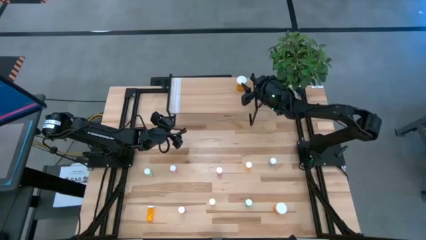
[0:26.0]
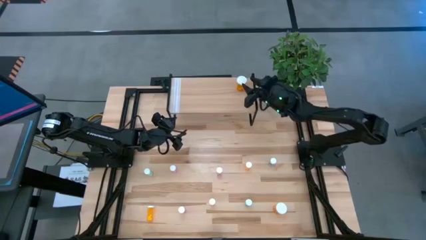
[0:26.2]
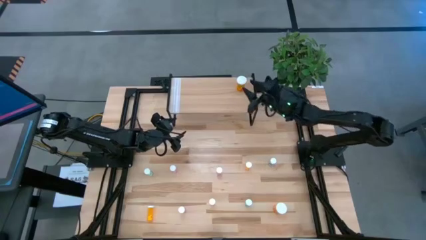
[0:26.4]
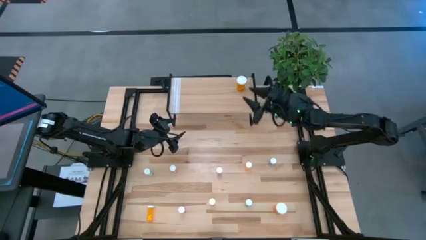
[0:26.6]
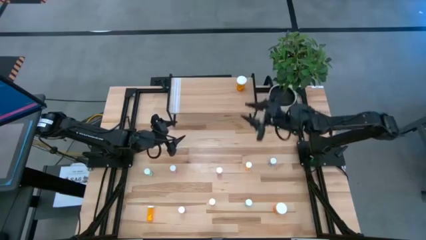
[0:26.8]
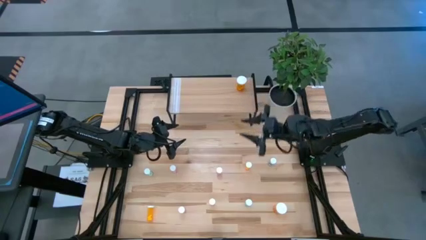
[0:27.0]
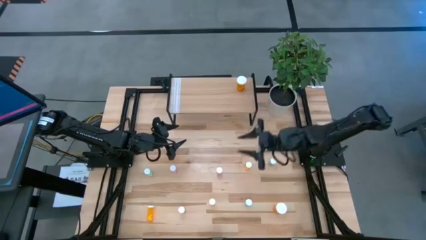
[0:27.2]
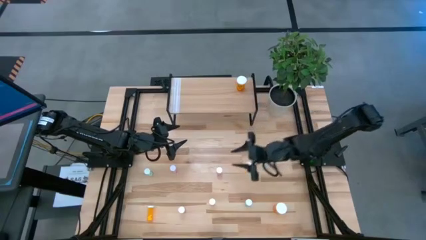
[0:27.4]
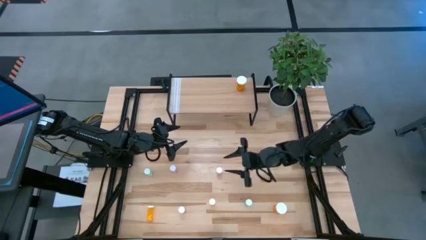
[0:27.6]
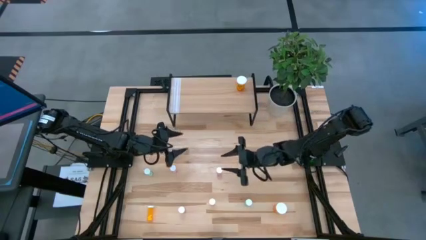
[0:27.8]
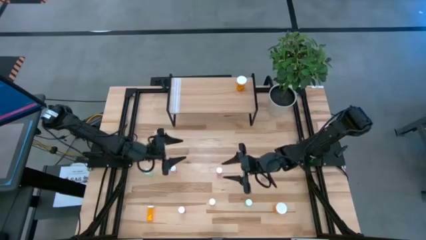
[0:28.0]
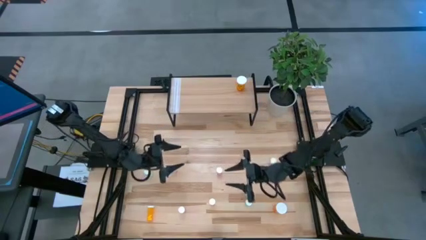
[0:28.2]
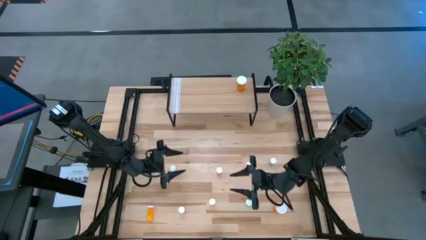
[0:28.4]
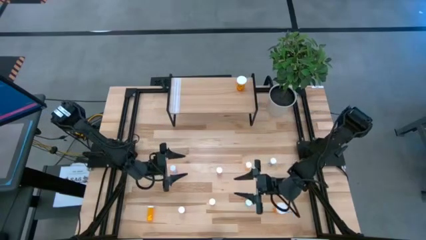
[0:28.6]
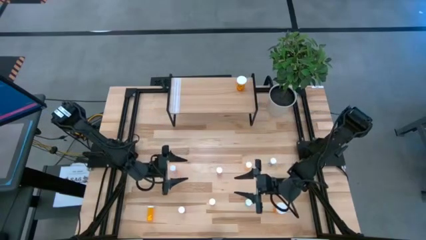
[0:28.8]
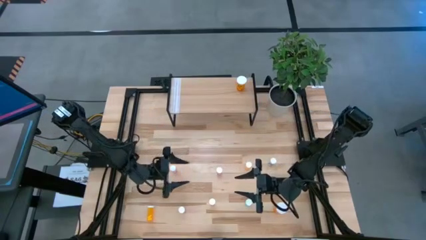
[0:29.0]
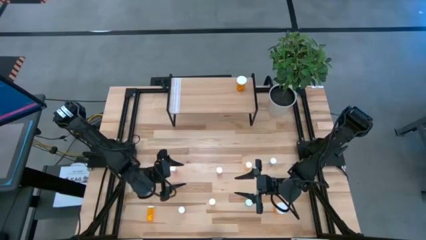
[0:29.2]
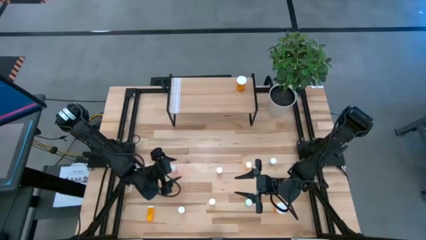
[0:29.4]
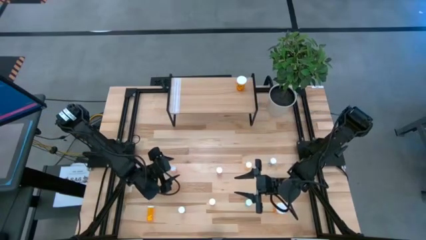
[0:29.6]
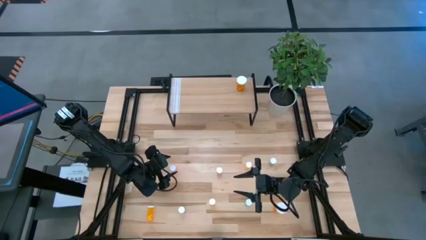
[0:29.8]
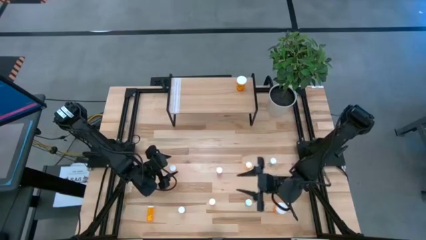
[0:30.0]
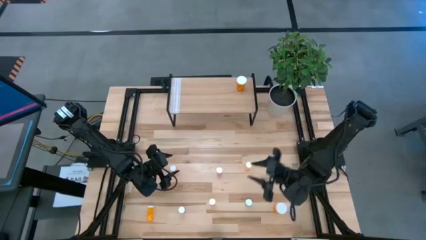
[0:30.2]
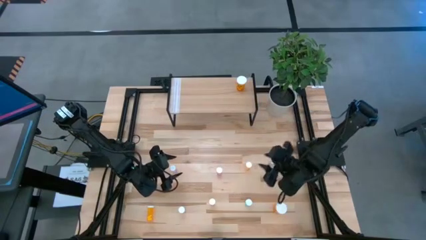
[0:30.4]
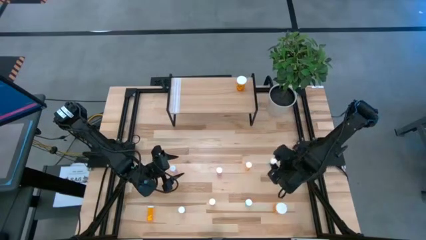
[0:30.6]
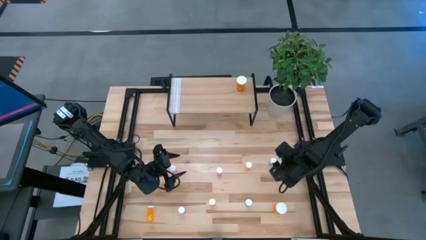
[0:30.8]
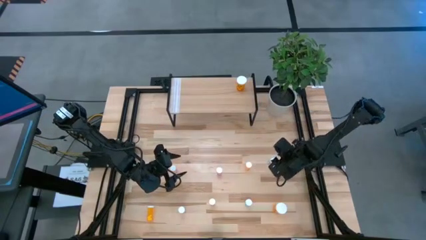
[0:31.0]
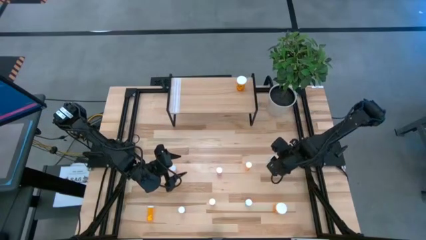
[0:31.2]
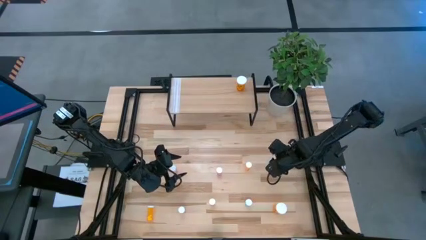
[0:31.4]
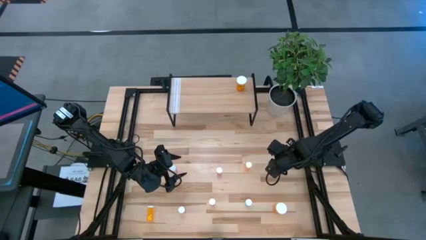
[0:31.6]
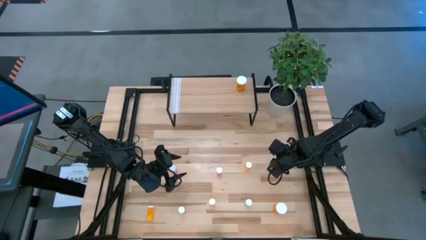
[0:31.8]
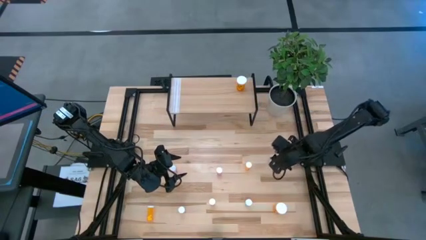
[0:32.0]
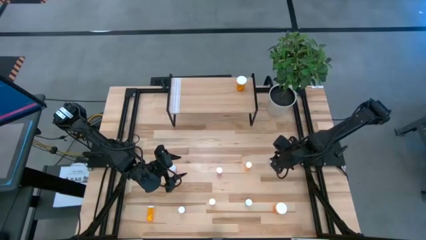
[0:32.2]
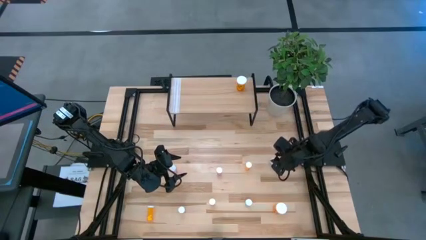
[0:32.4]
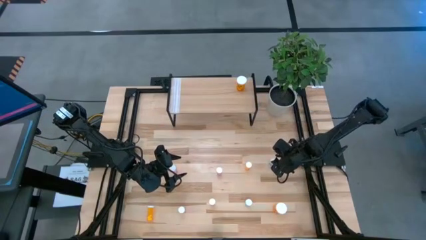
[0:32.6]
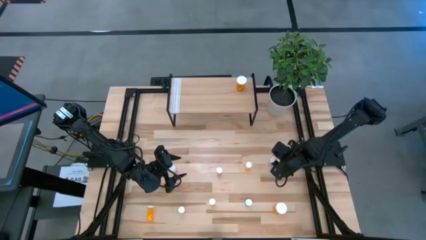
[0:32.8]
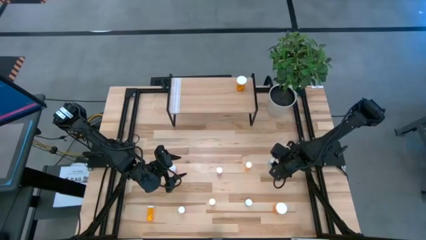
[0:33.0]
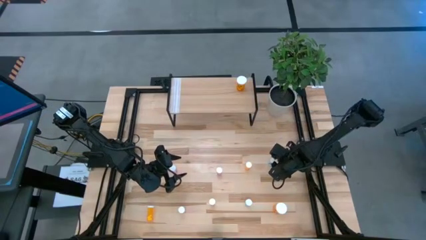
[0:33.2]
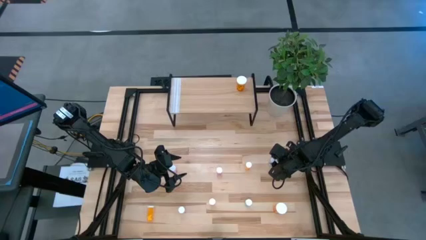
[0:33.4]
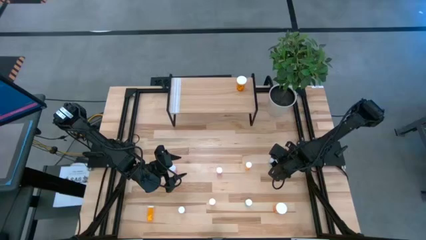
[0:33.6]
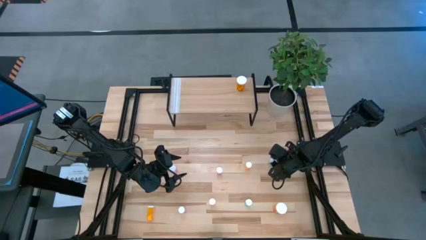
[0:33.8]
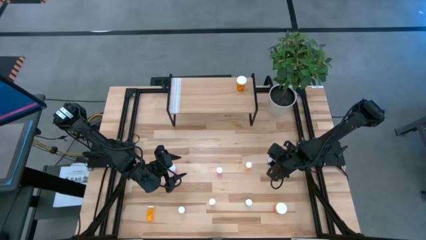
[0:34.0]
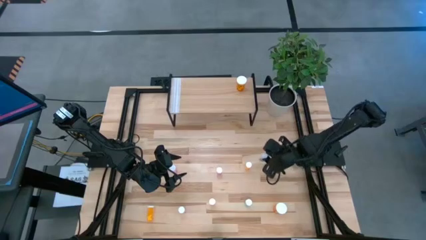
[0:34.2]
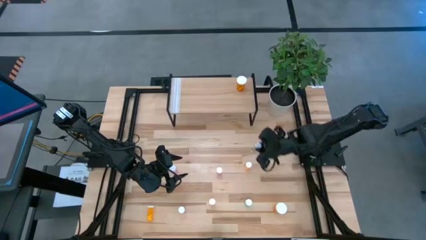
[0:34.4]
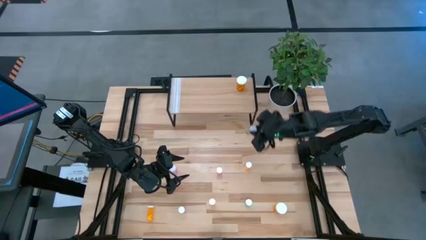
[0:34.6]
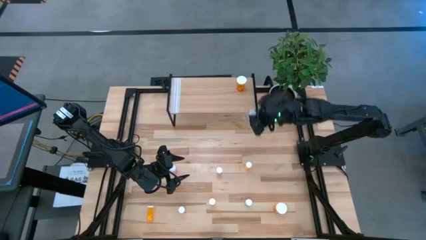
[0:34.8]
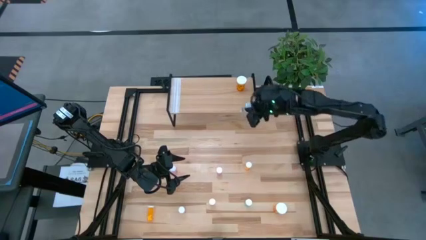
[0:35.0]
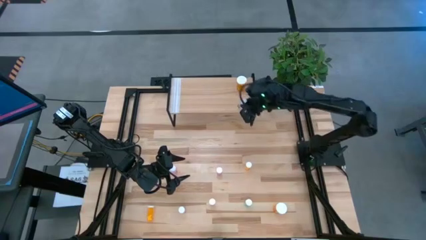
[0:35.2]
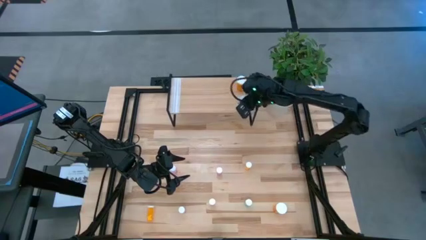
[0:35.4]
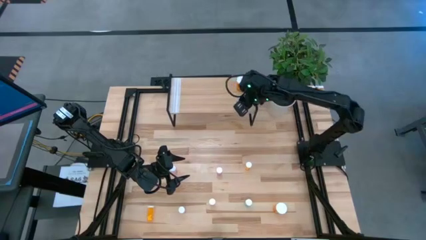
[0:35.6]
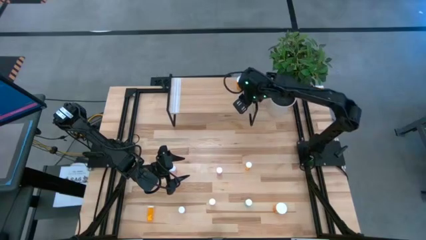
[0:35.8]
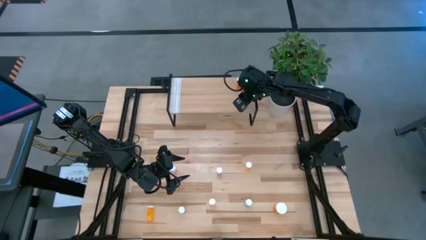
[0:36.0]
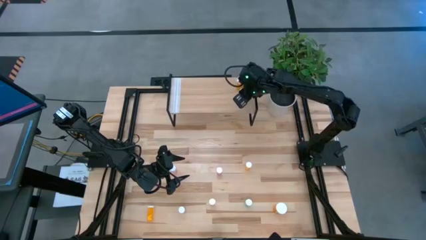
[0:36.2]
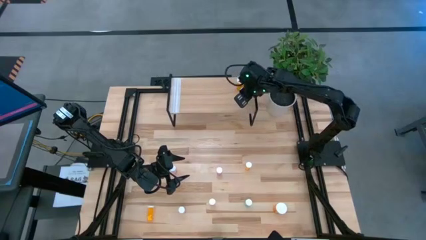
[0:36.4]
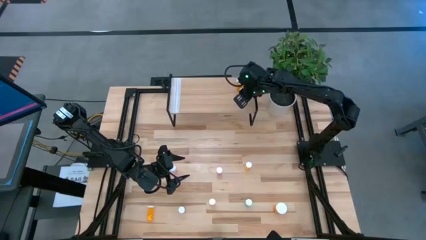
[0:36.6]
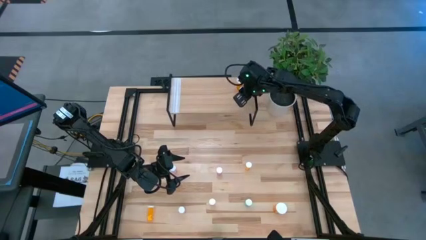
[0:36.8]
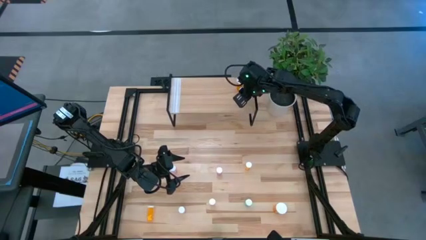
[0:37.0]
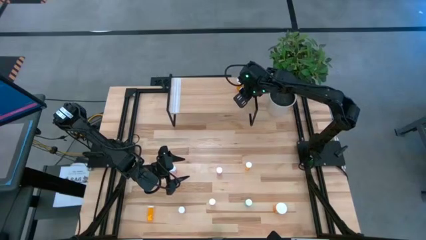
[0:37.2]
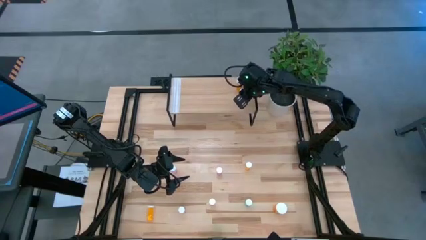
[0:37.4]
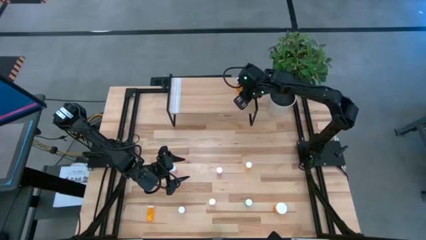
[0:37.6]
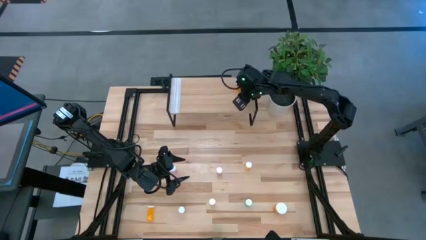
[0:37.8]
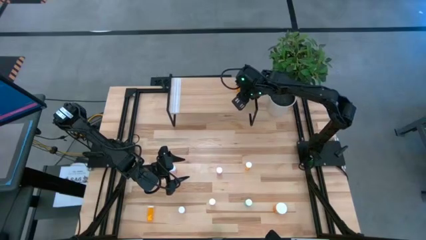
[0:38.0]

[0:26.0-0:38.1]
Task: Pick and place medicine bottles onto shelf by color
Put the top right small blue pill bottle on the shelf
